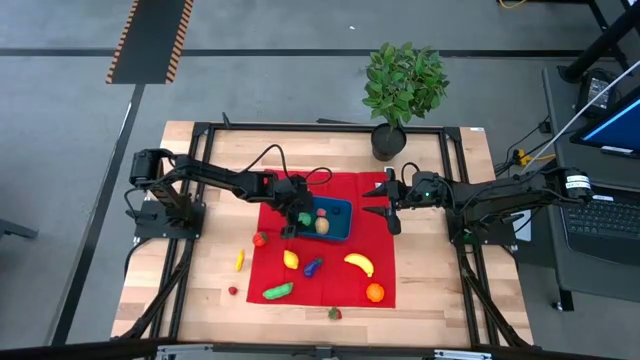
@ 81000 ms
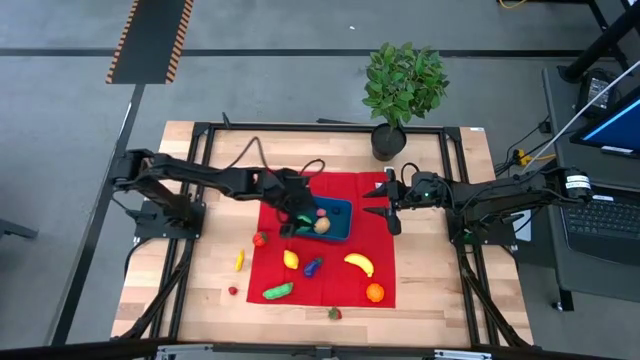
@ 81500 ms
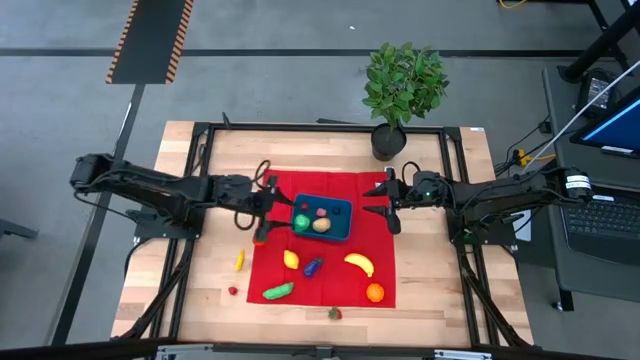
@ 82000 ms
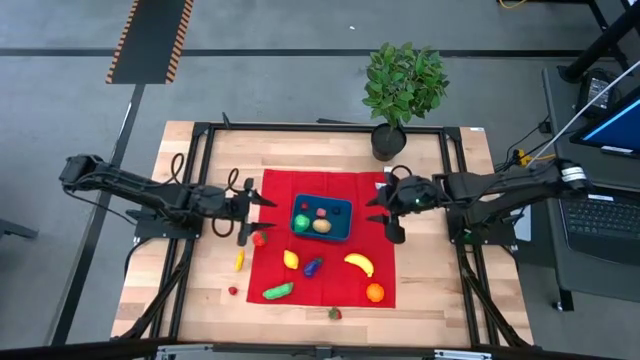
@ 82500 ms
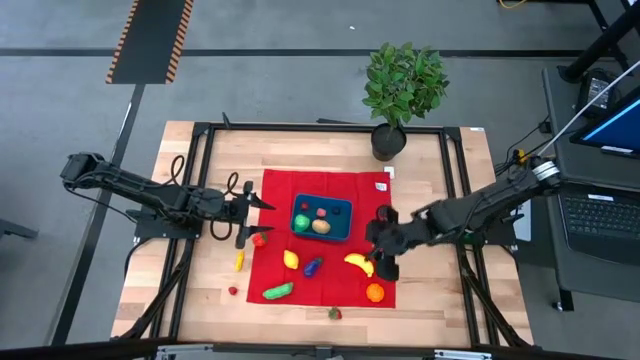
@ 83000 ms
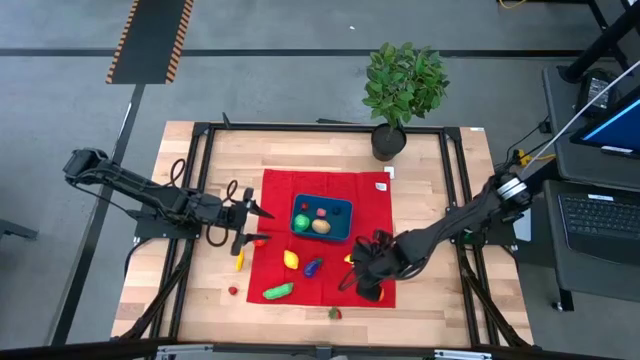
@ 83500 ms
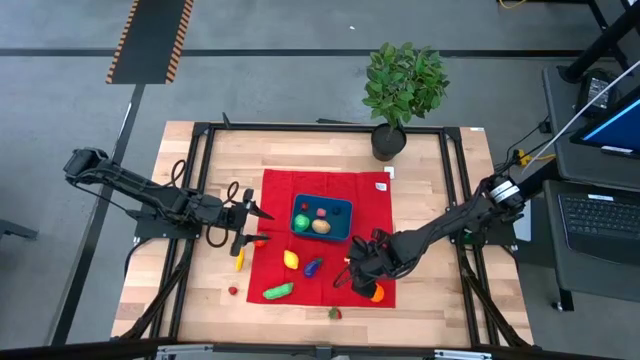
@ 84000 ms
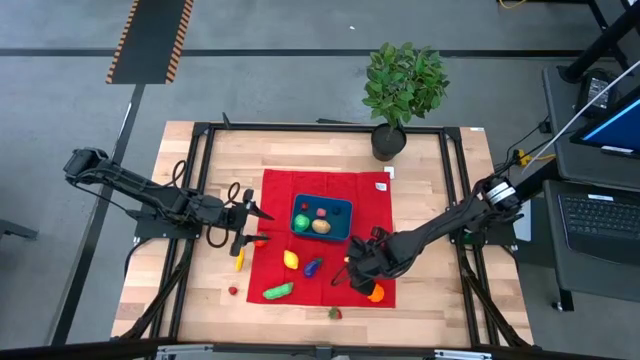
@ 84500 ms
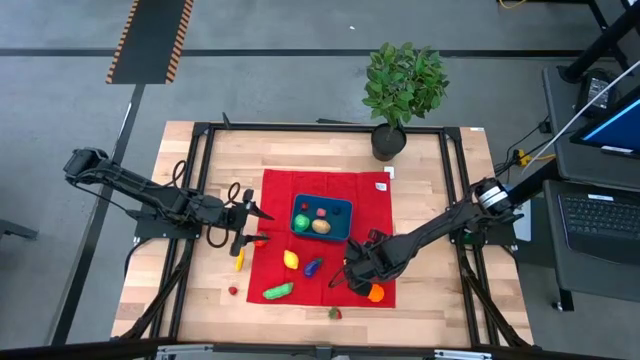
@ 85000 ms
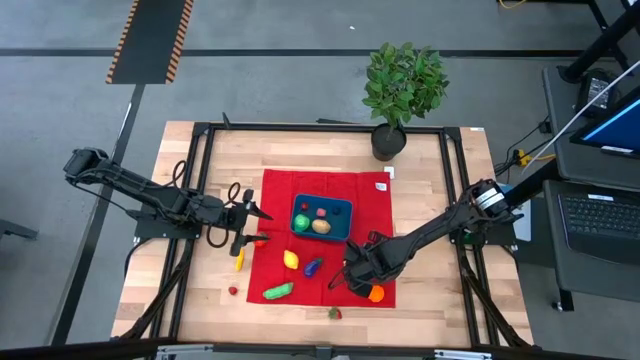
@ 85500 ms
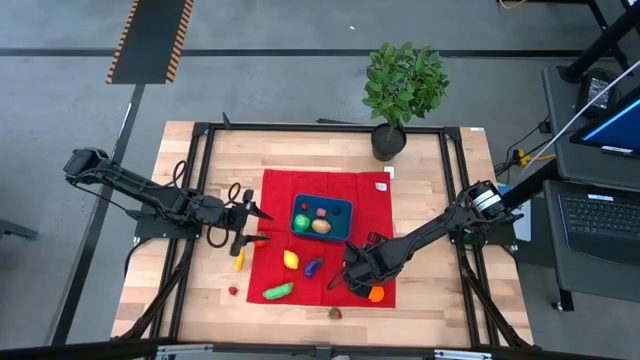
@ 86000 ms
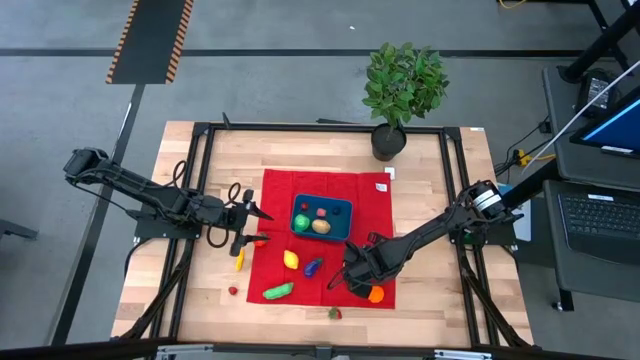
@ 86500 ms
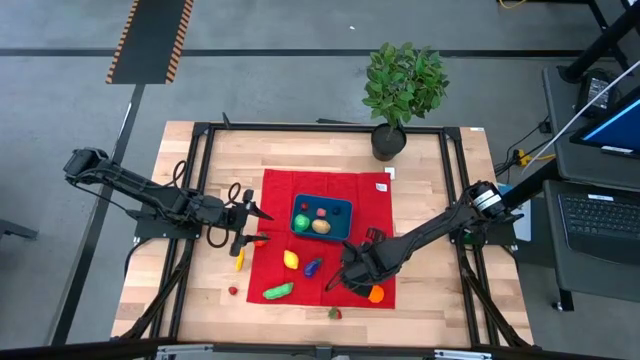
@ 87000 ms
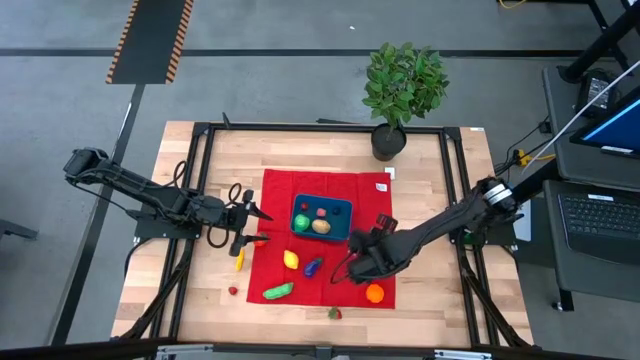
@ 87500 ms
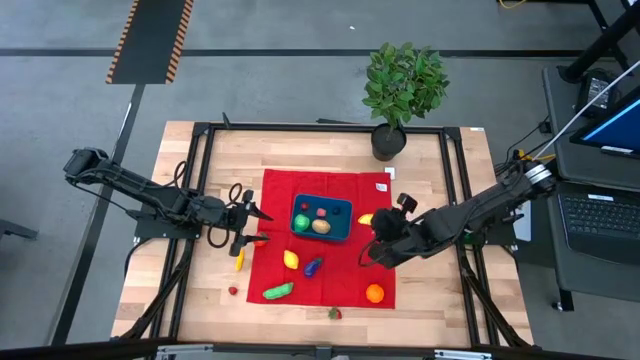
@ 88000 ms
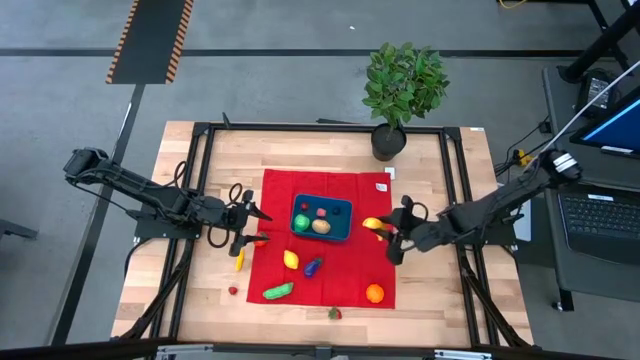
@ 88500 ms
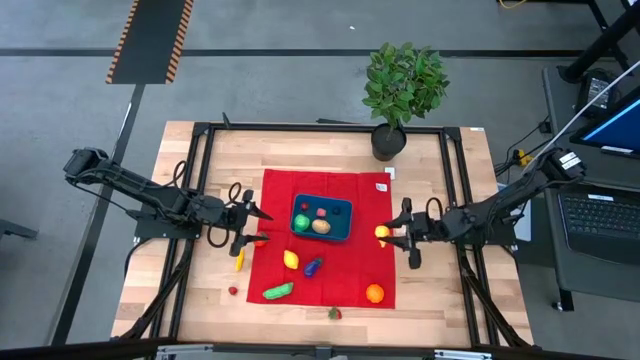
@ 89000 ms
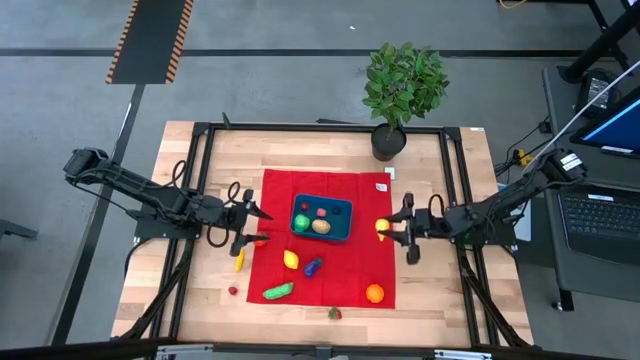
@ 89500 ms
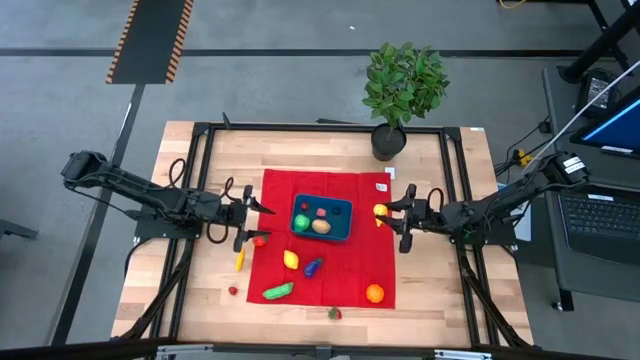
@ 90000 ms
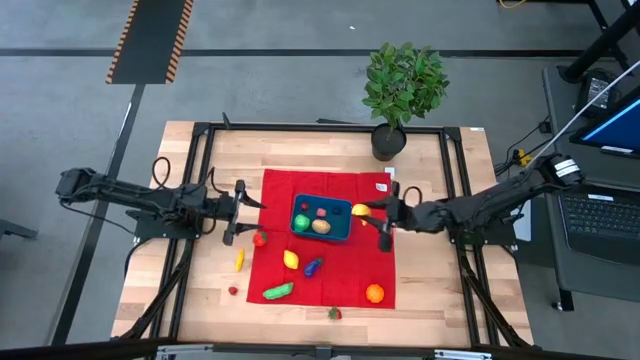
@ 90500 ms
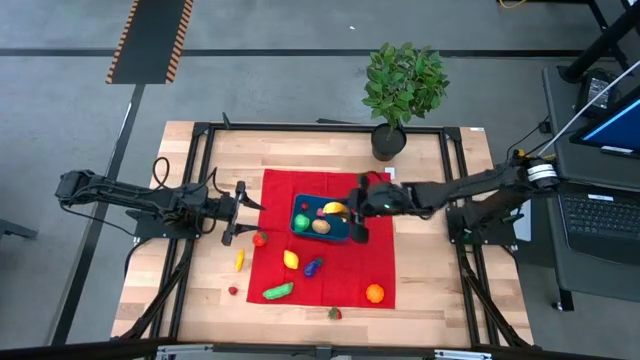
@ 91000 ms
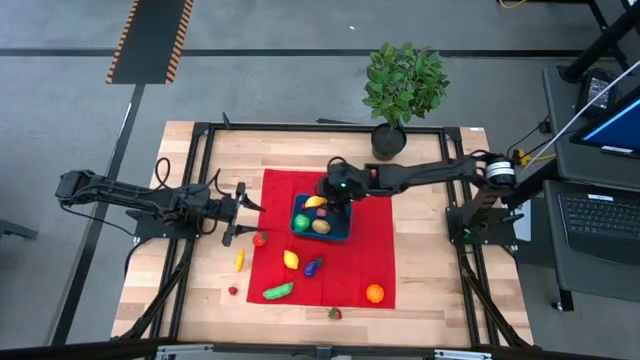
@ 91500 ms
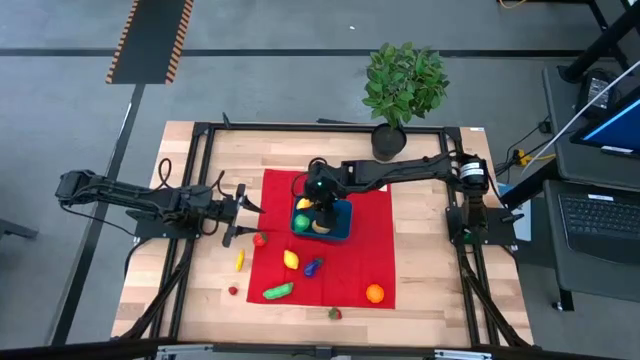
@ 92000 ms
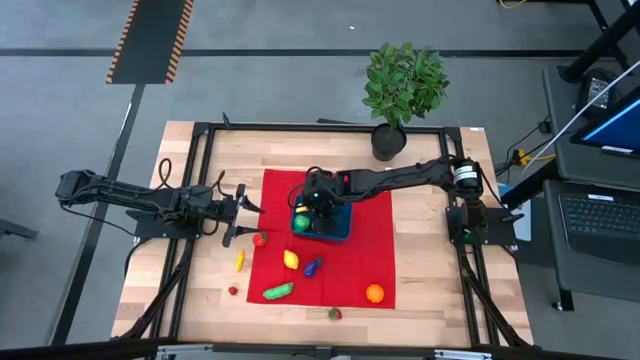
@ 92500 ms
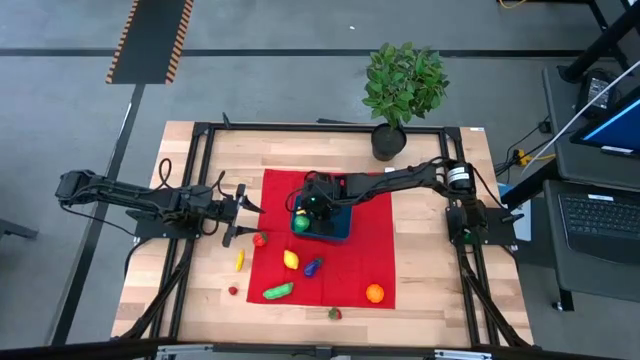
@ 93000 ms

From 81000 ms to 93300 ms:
Task: Pick and placing Produce into tupperware
Put the yellow banana into the blue bin

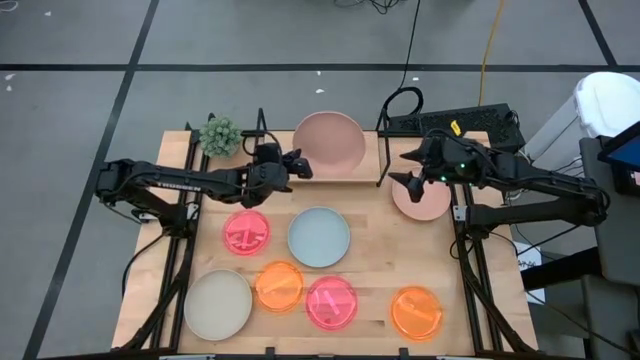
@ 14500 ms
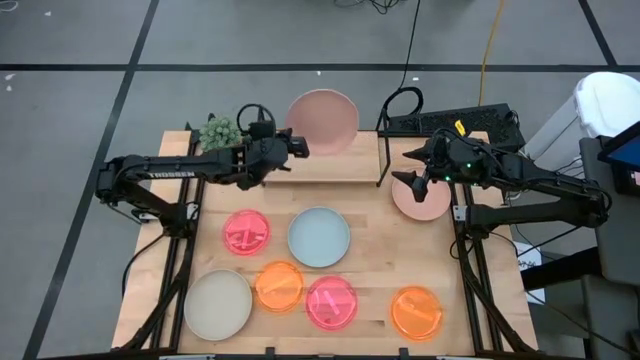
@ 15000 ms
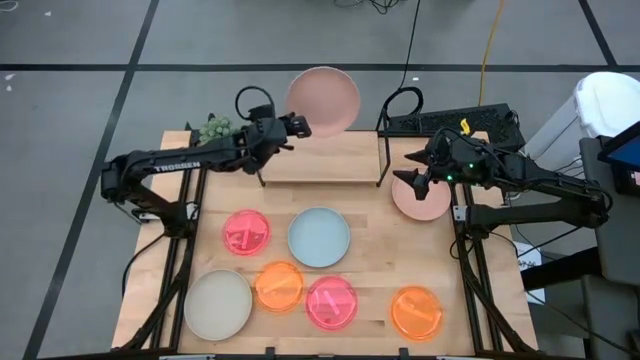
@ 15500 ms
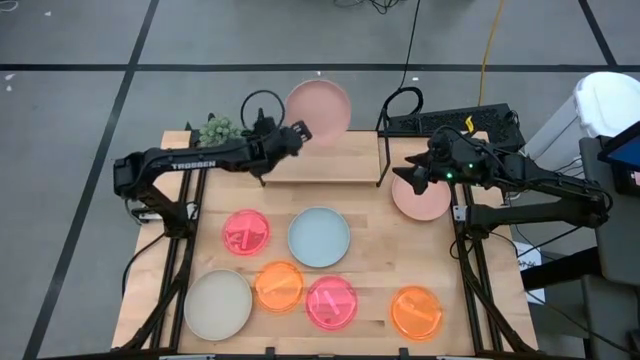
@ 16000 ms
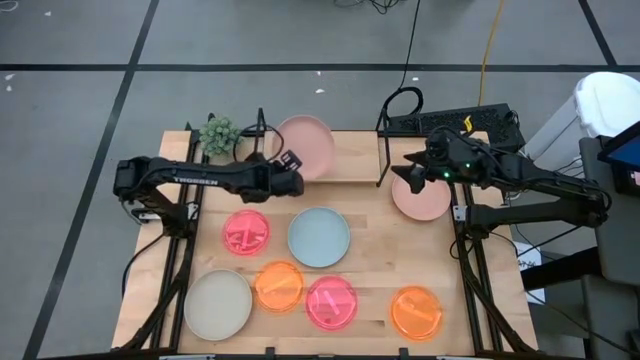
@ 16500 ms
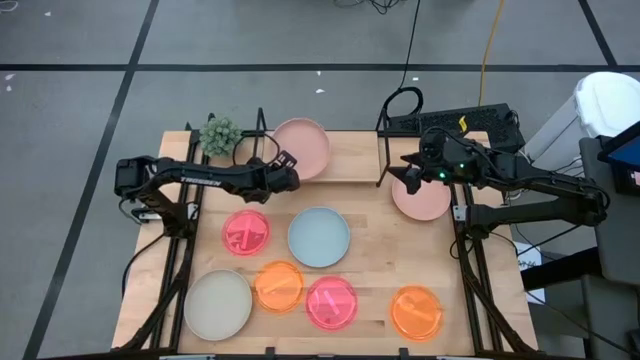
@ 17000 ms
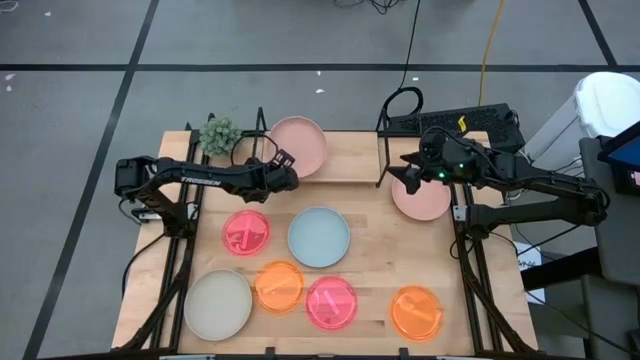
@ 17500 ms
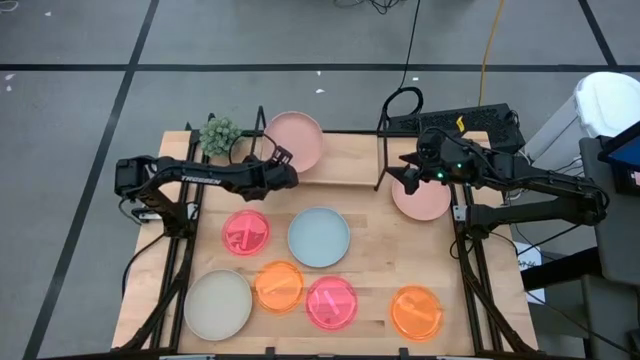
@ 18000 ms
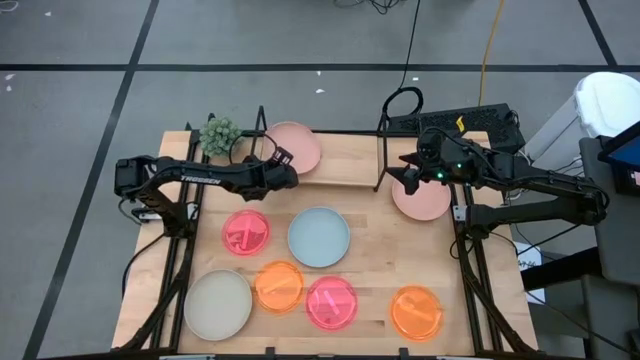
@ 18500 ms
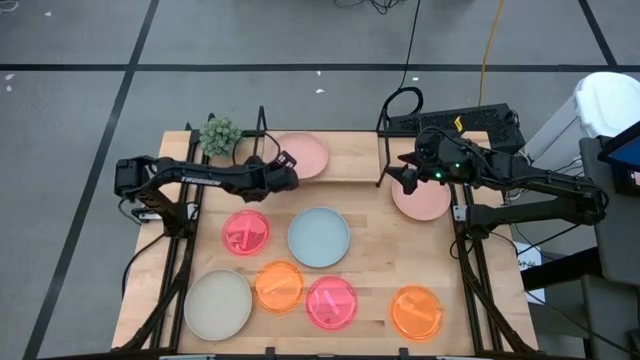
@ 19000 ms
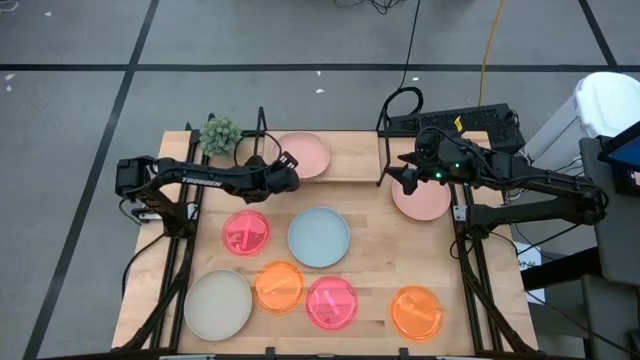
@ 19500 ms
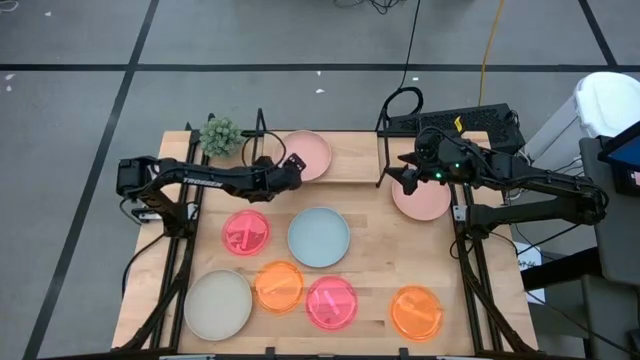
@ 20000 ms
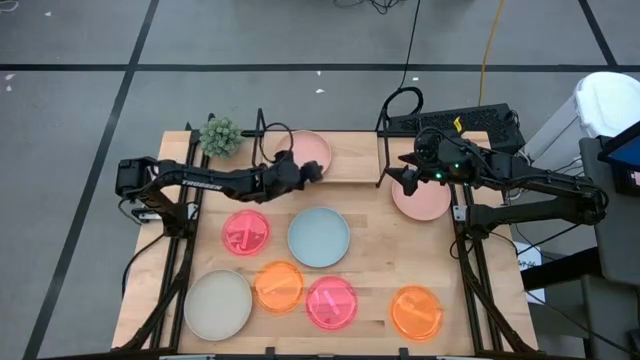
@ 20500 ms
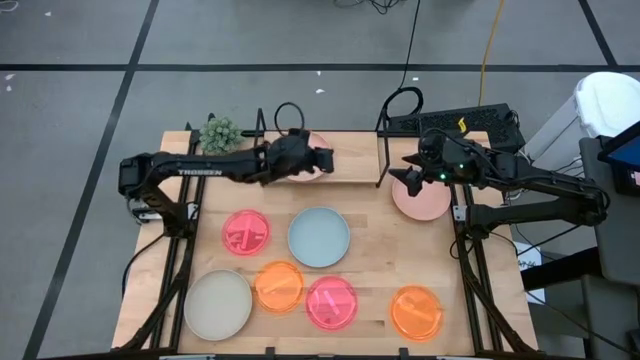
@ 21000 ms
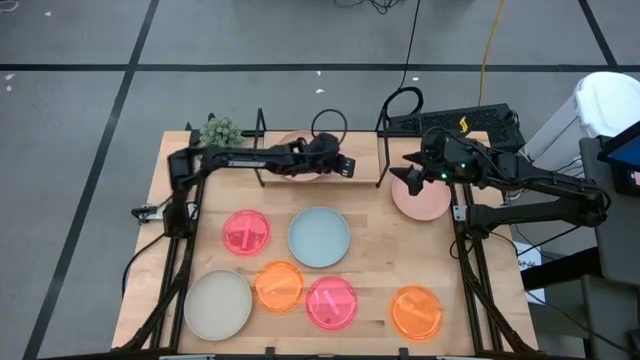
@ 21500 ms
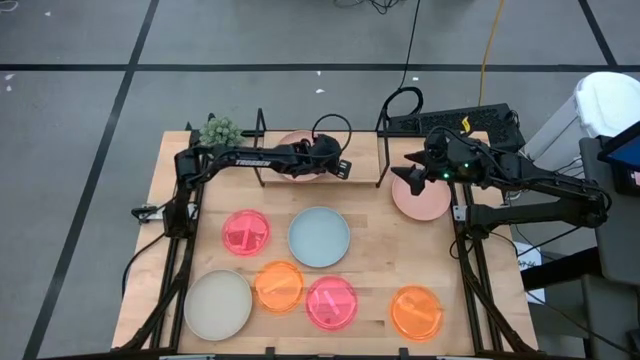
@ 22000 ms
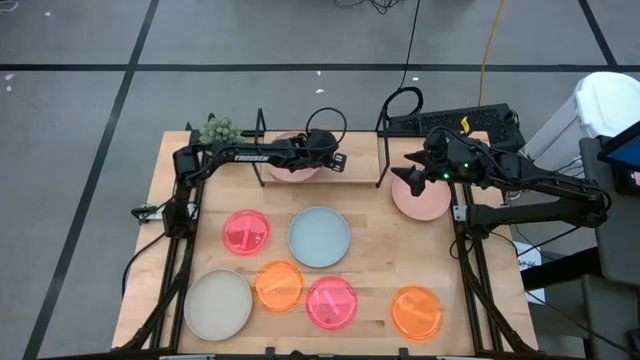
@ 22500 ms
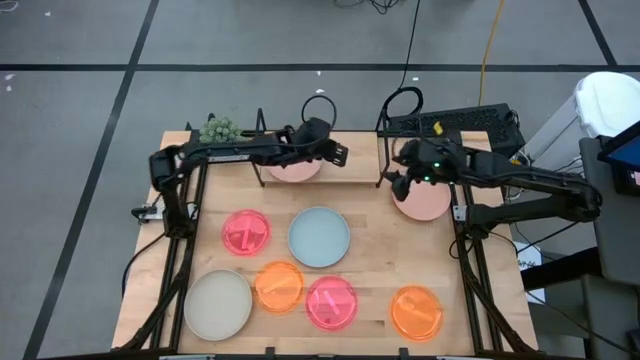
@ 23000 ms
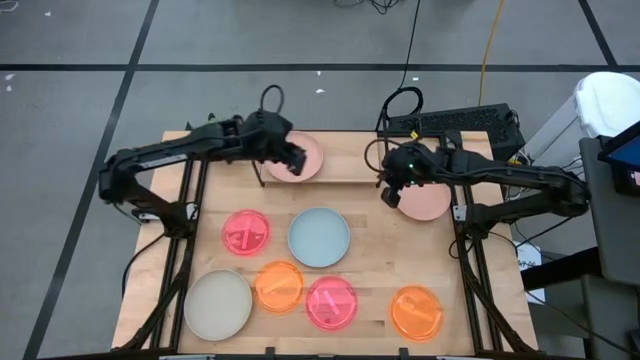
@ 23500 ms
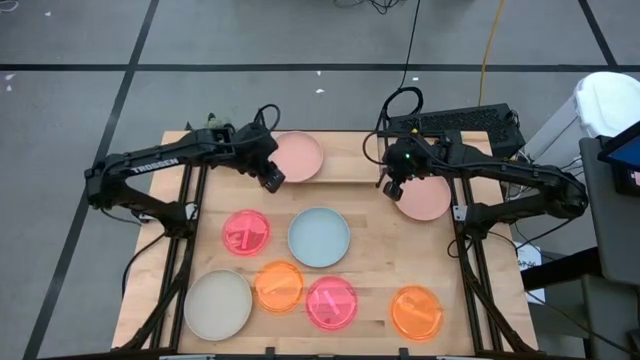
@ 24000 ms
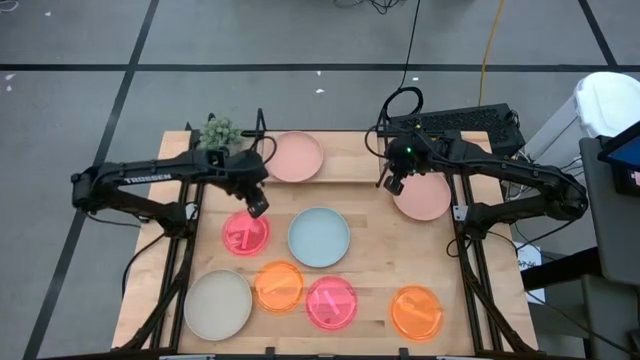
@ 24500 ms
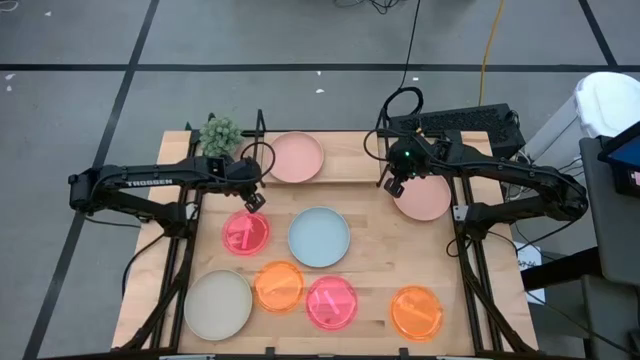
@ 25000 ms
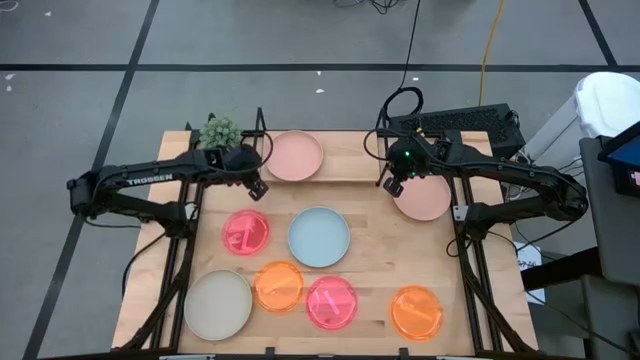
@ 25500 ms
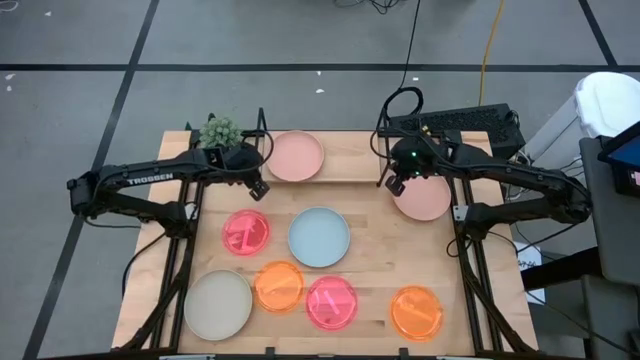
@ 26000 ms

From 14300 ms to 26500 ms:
Task: Place and stack plates onto a shelf
Put the bottom pink plate on the shelf
